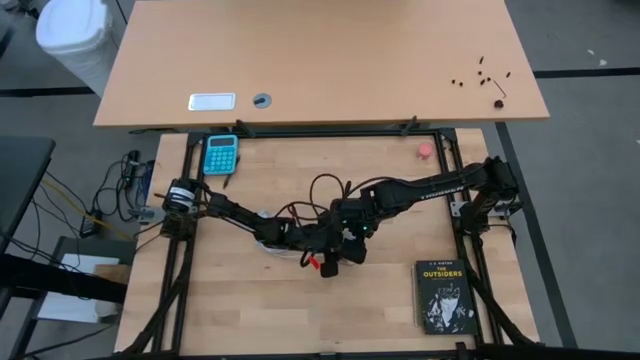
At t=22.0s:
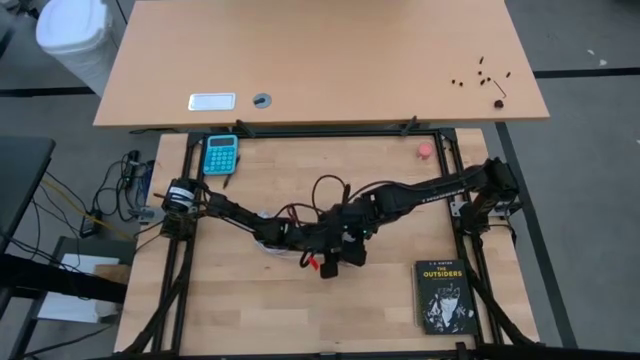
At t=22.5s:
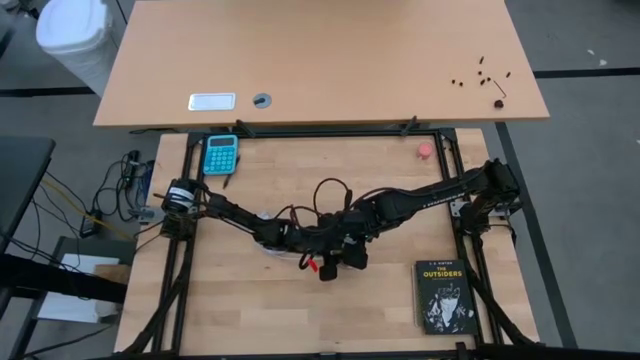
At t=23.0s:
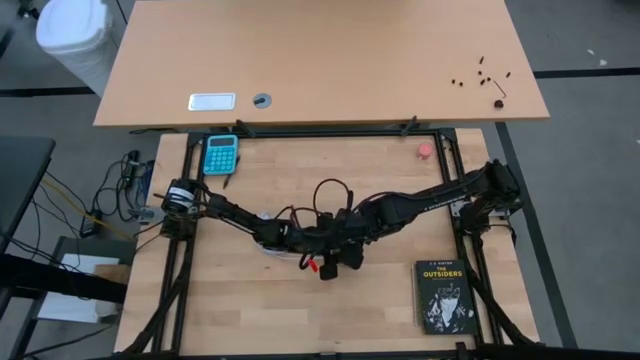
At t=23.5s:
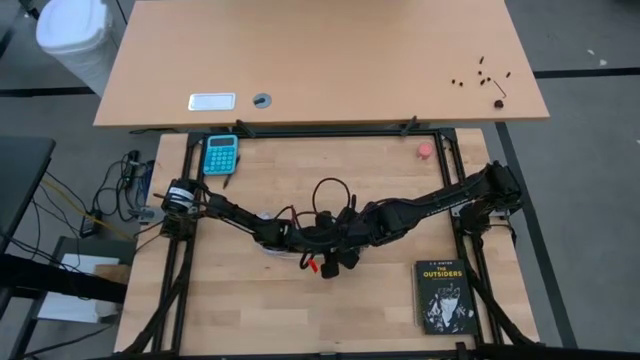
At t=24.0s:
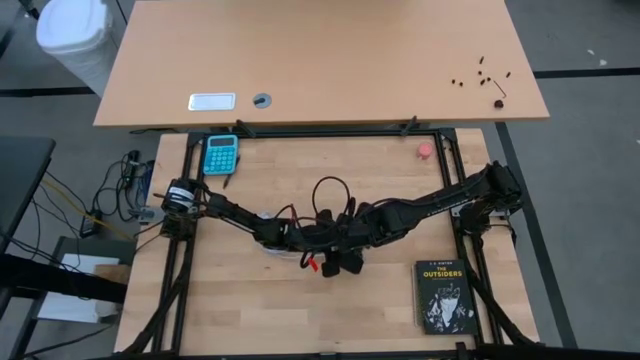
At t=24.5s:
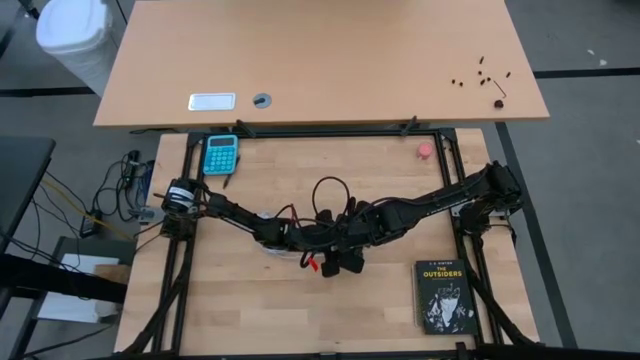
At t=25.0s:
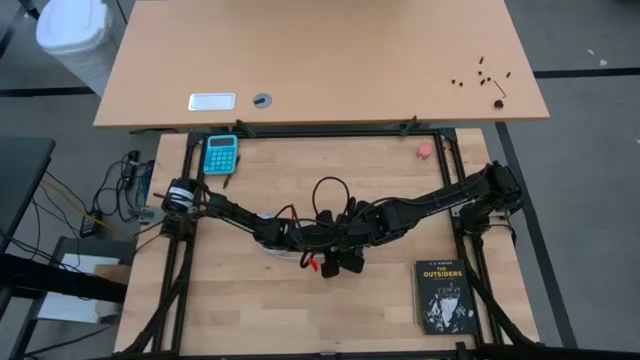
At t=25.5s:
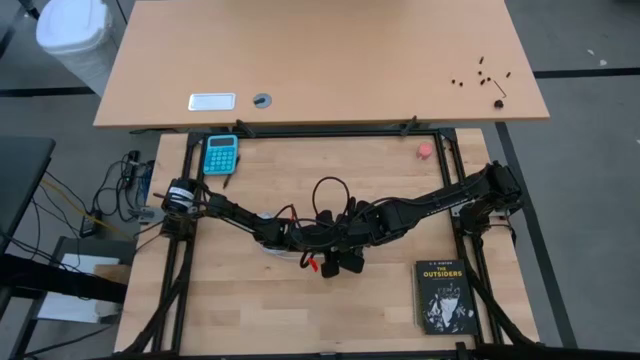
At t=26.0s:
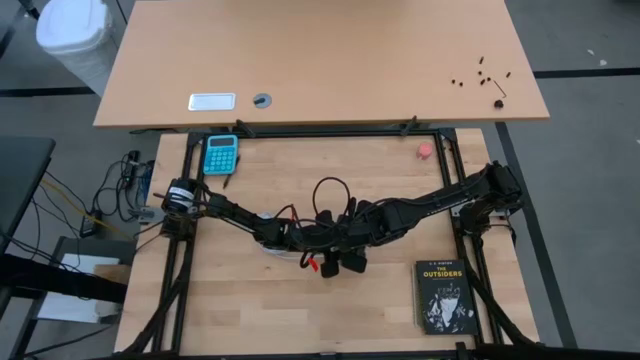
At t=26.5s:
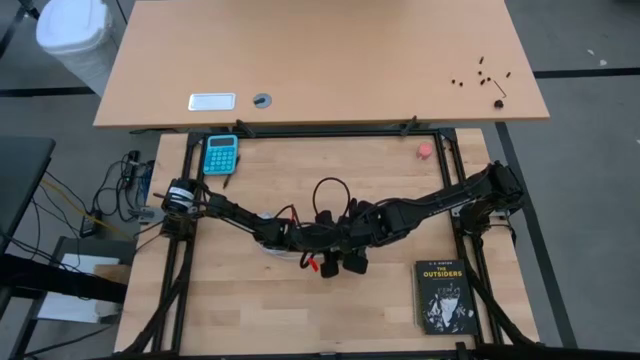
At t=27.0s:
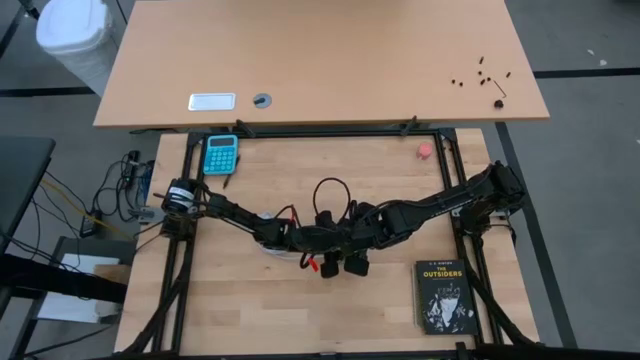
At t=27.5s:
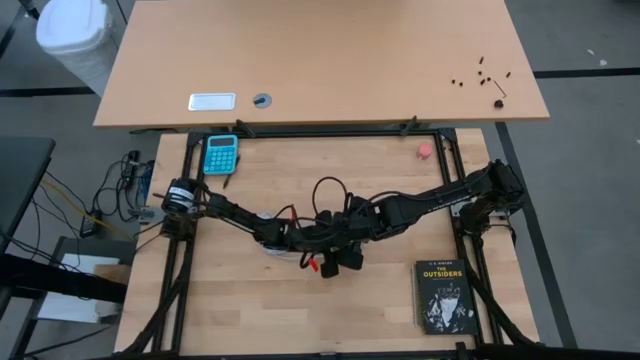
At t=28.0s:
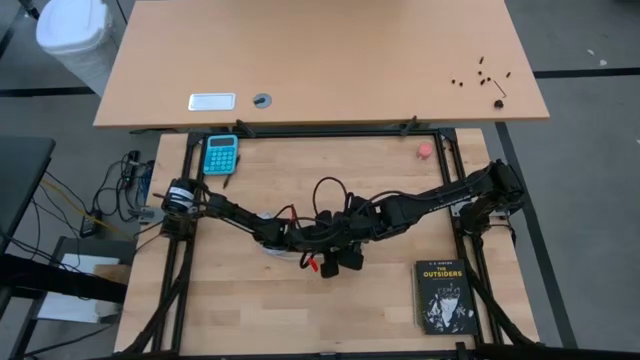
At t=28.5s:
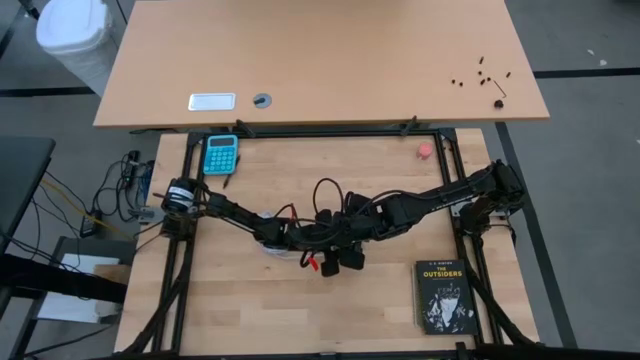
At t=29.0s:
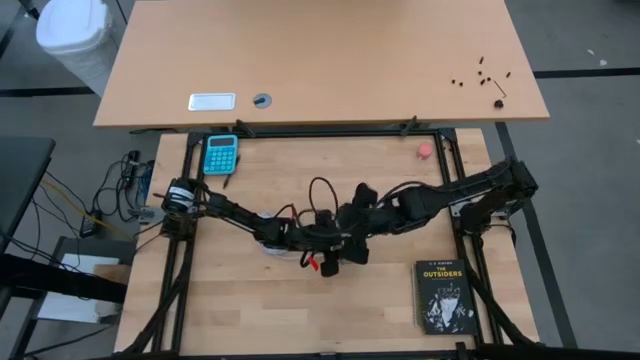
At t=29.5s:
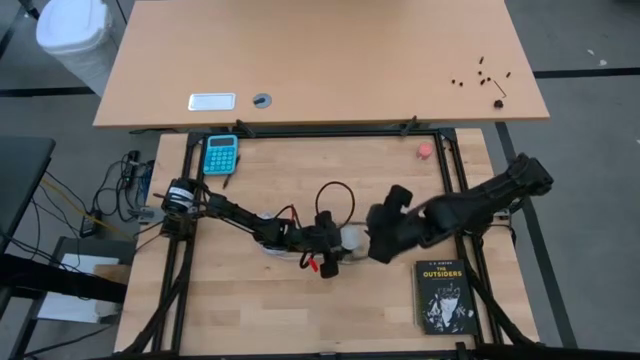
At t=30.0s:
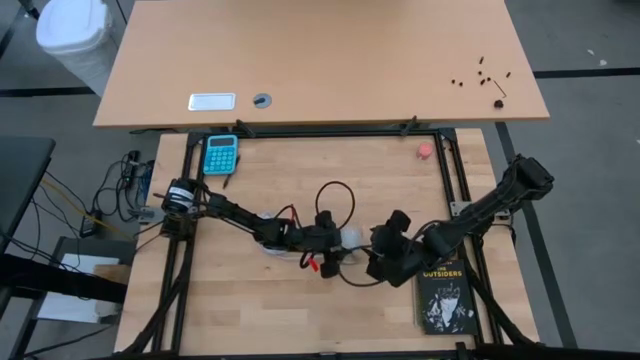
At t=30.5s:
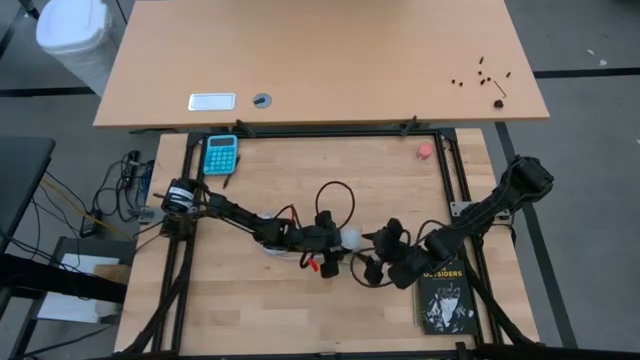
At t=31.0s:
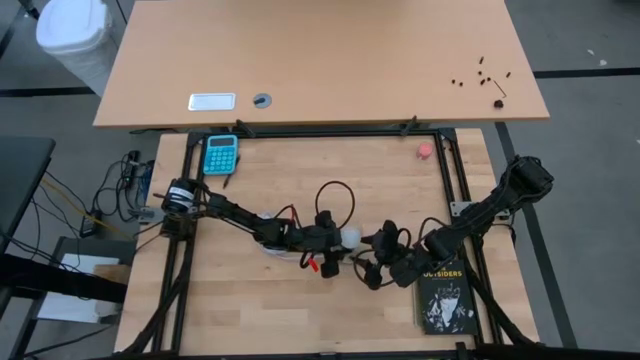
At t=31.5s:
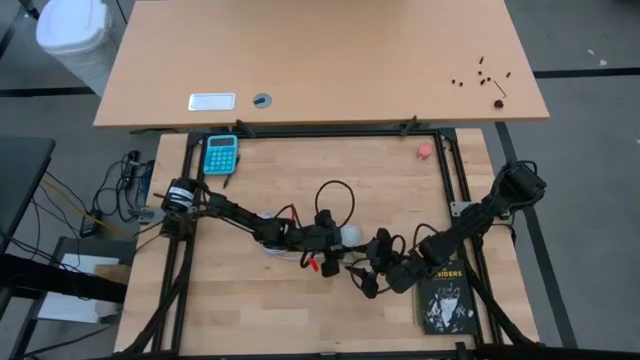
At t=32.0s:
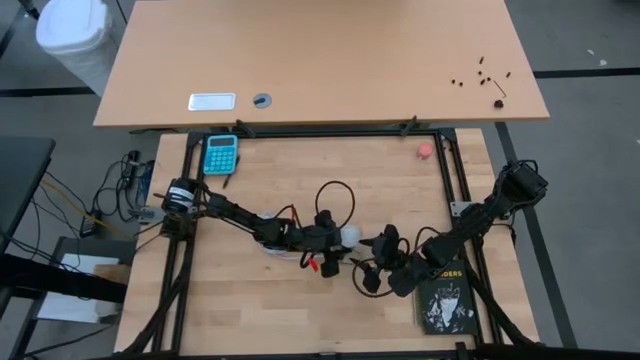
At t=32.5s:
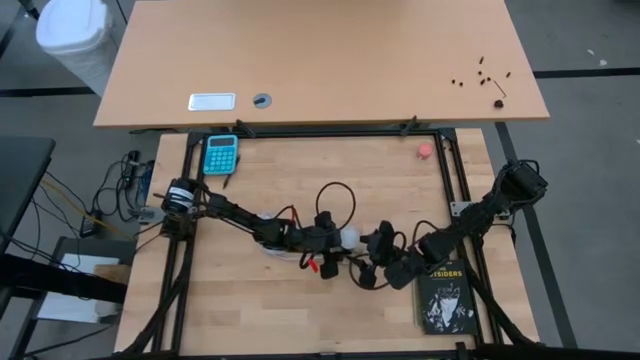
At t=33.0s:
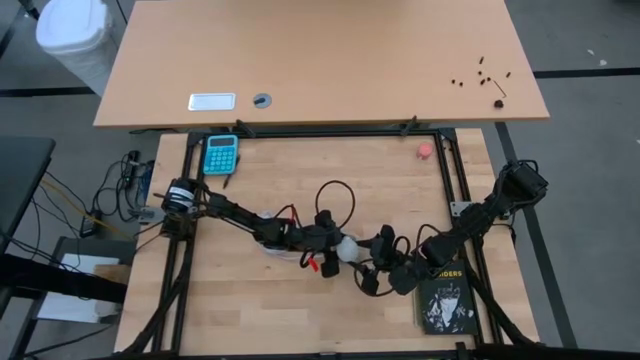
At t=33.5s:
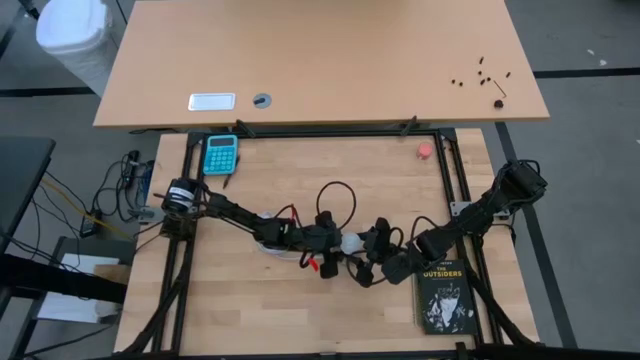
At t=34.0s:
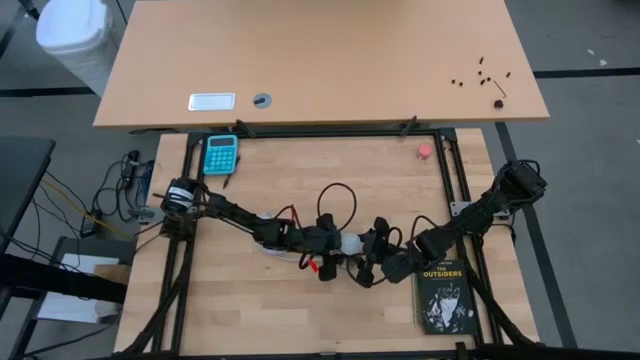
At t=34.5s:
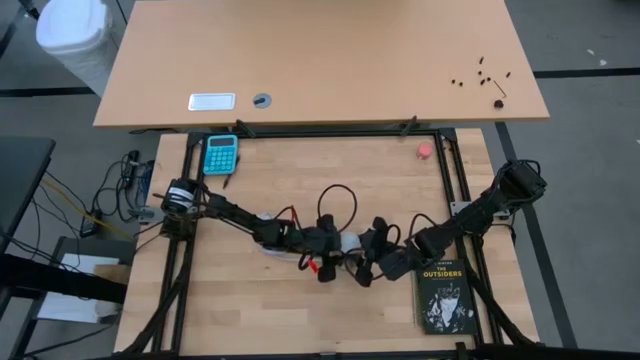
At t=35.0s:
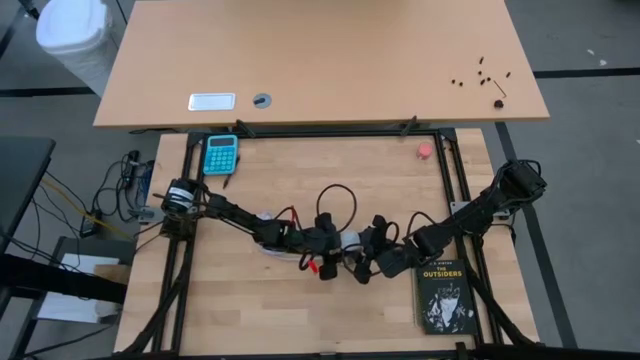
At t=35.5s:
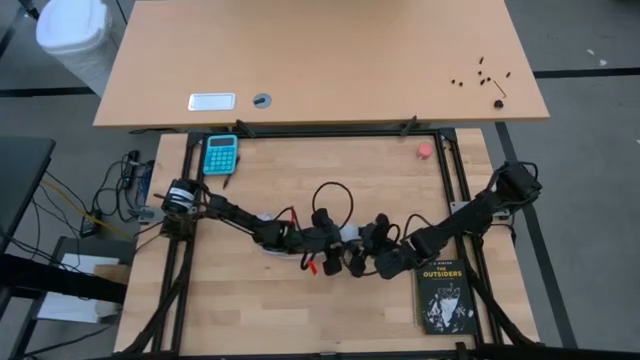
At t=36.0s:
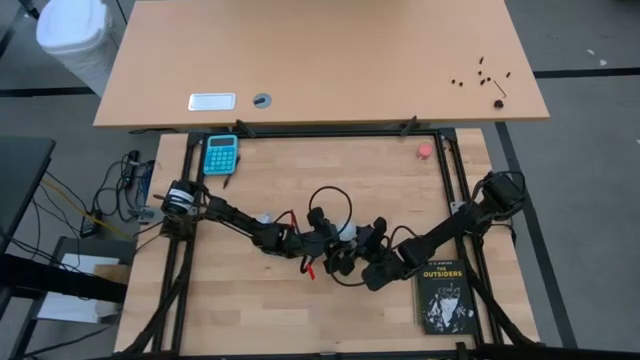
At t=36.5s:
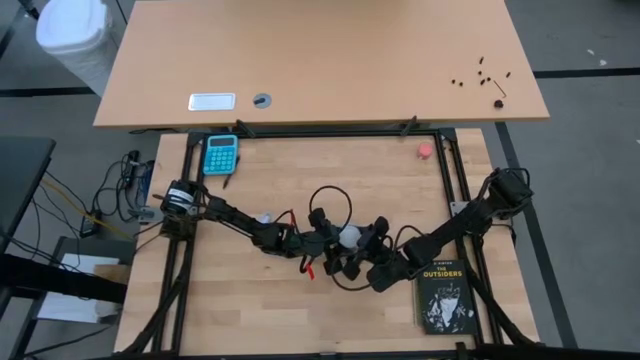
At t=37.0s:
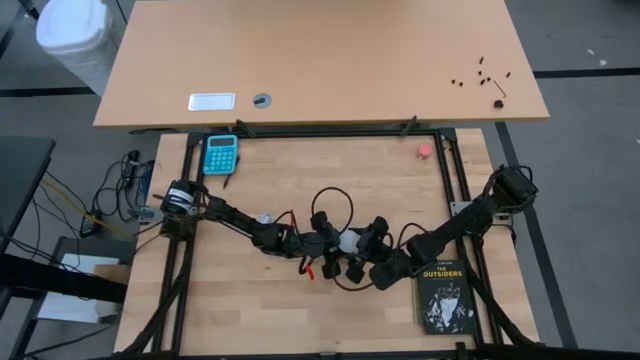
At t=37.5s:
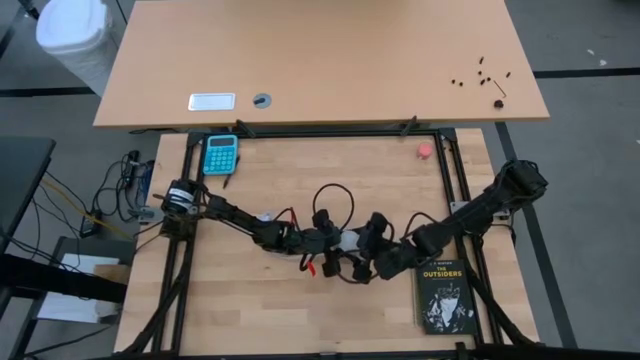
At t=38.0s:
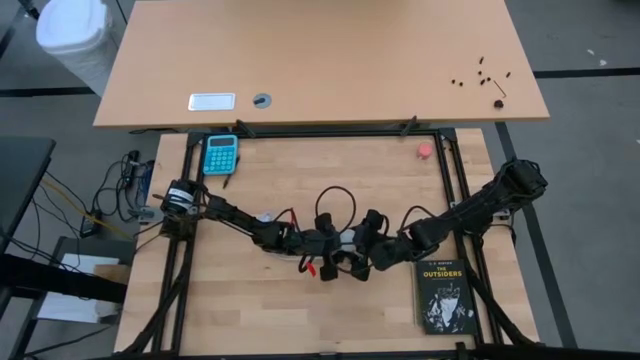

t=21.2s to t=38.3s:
Task: Screw lightbulb
Insert the lightbulb into the lamp

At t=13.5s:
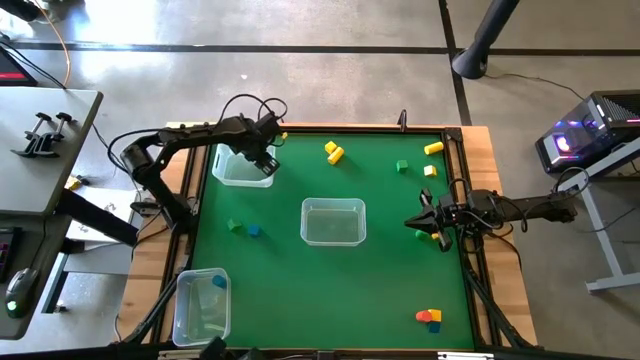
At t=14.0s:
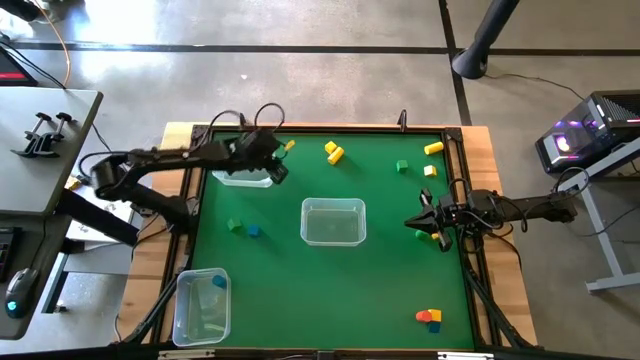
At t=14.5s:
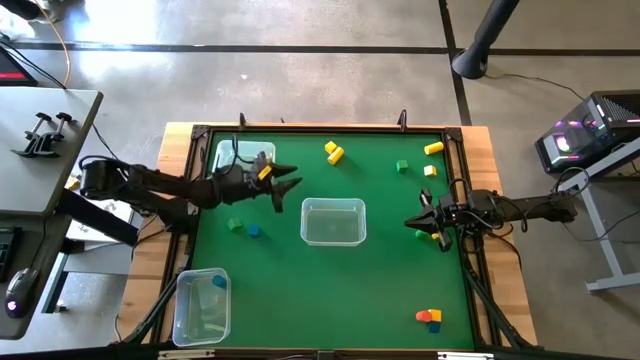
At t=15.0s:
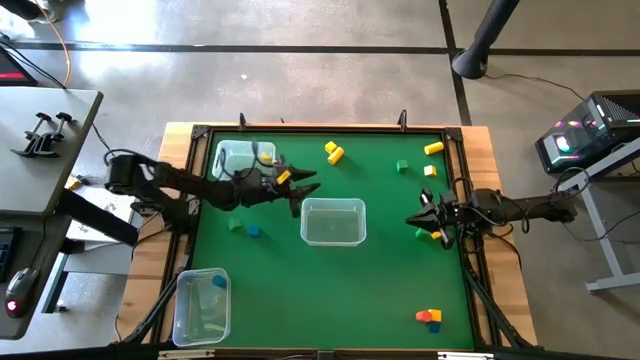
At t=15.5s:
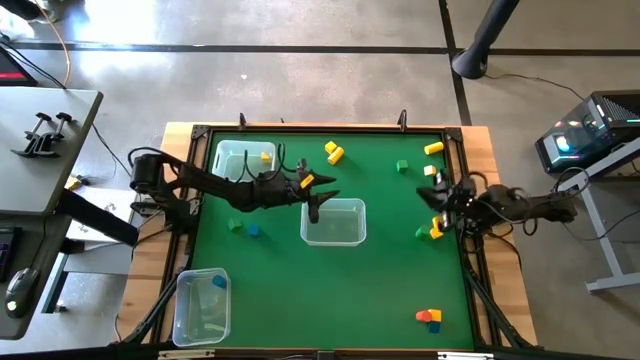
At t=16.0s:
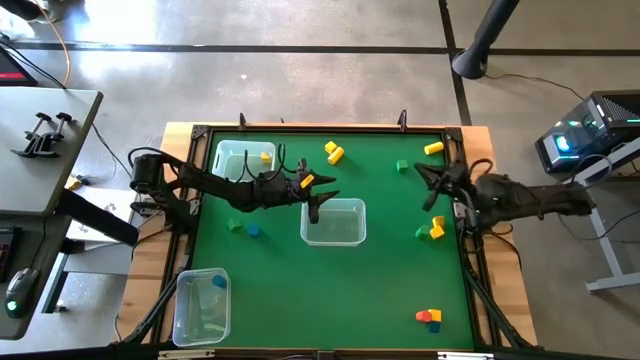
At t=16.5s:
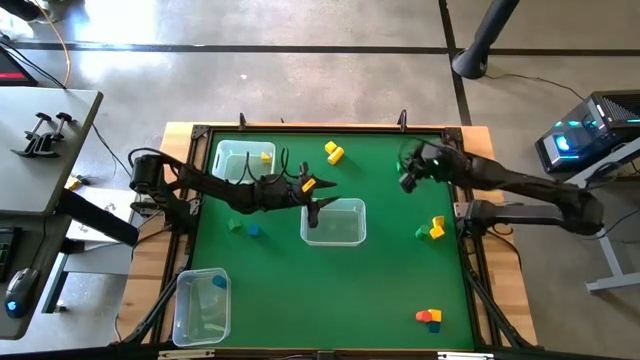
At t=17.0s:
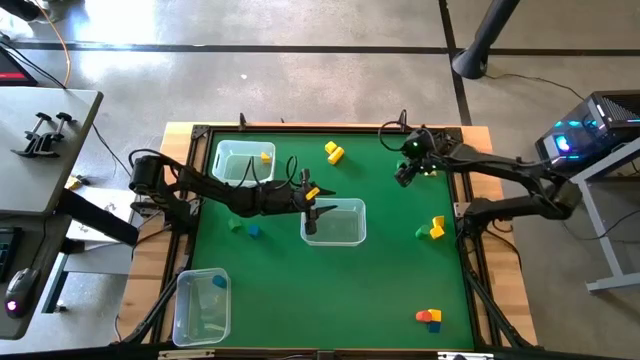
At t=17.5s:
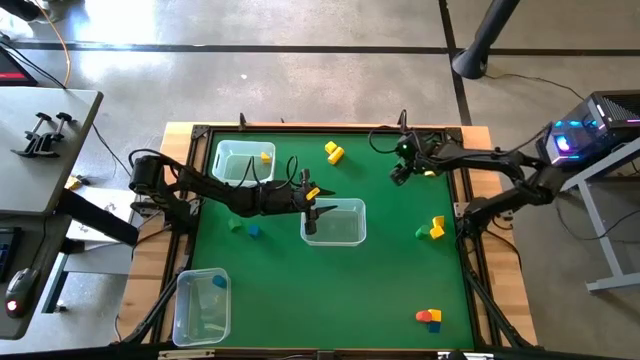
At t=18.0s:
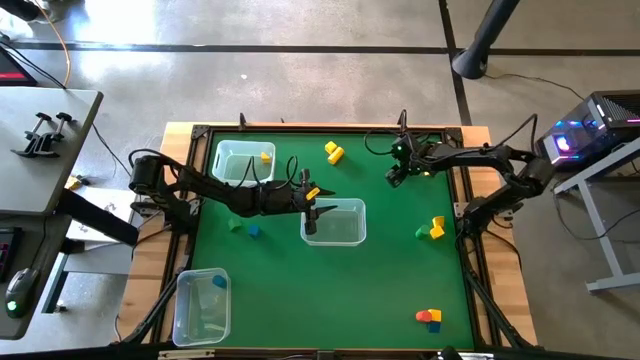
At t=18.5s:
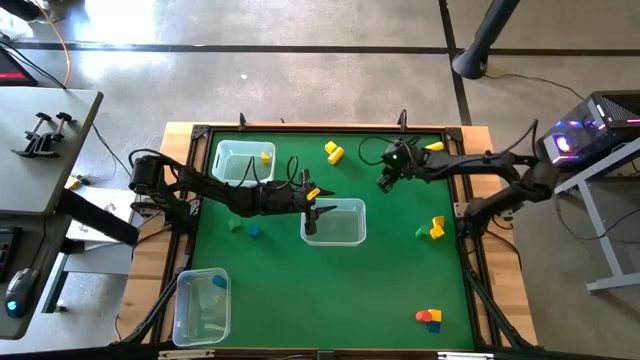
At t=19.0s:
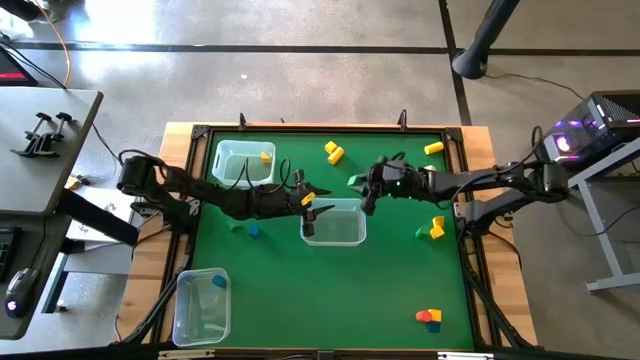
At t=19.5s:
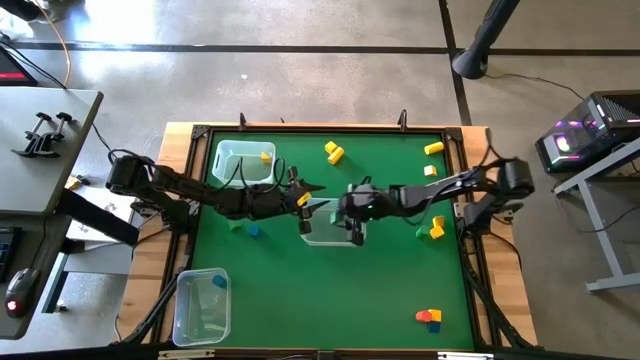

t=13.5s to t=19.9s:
Task: Sort blocks by size
Put the green cube block into the middle right transparent bin
